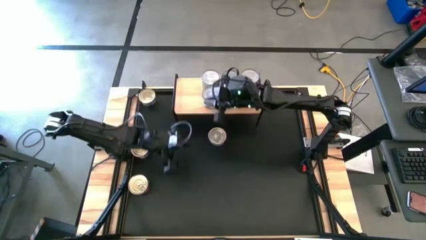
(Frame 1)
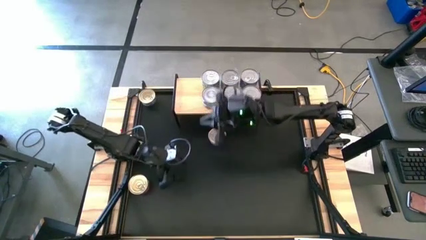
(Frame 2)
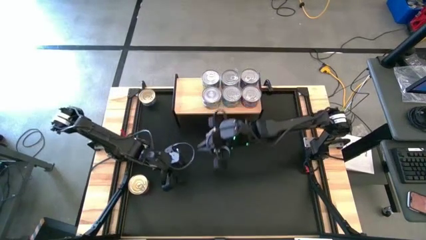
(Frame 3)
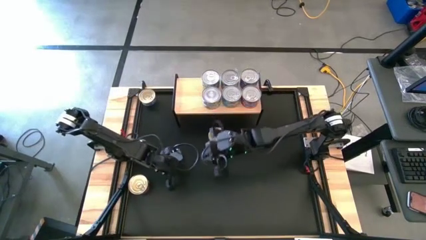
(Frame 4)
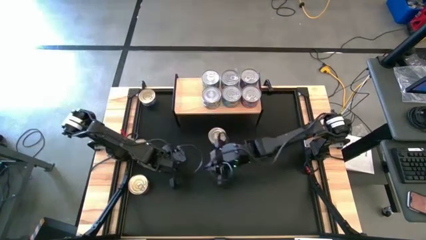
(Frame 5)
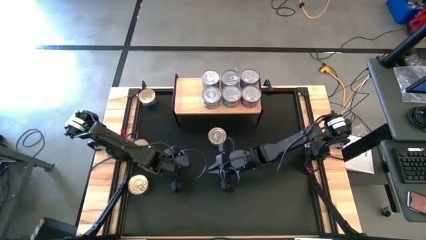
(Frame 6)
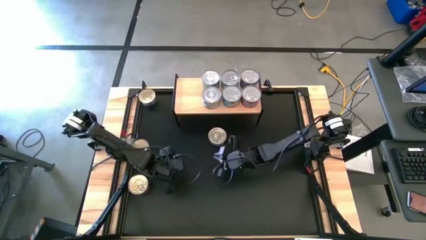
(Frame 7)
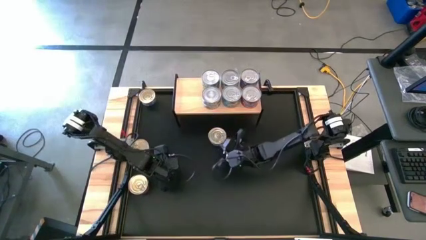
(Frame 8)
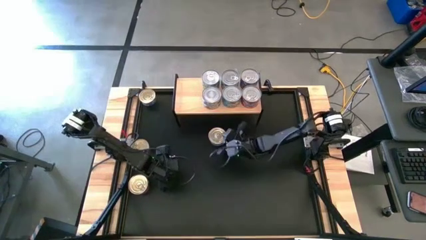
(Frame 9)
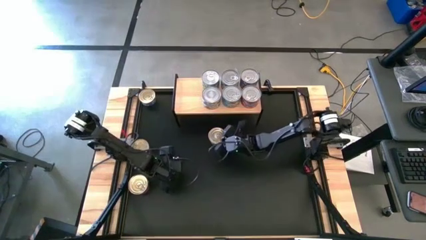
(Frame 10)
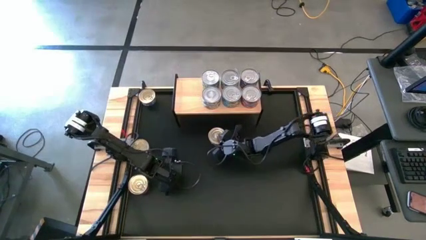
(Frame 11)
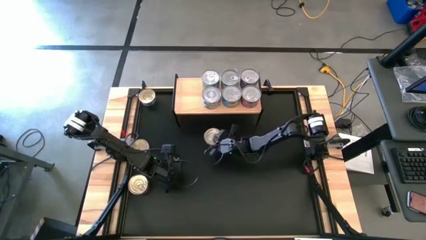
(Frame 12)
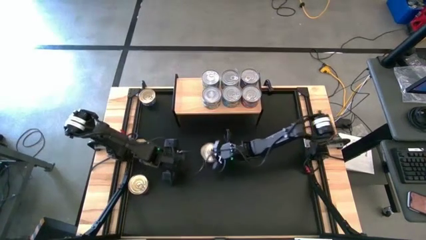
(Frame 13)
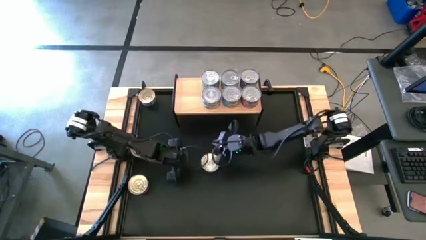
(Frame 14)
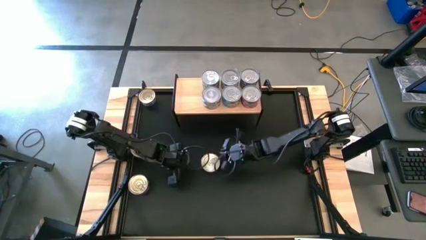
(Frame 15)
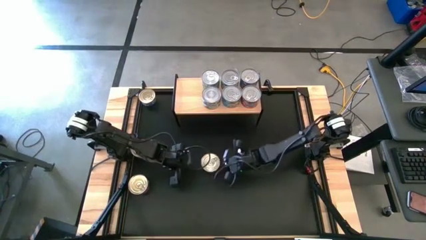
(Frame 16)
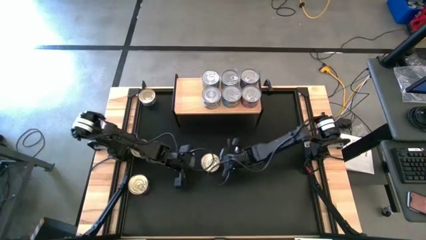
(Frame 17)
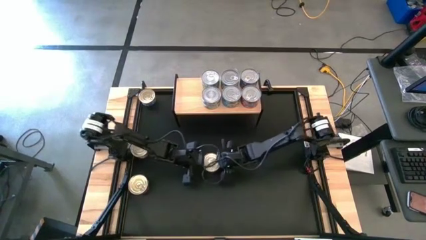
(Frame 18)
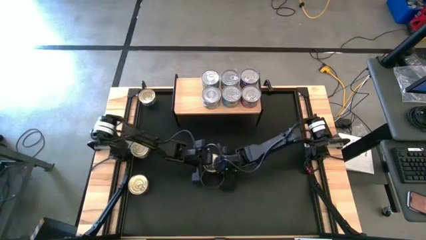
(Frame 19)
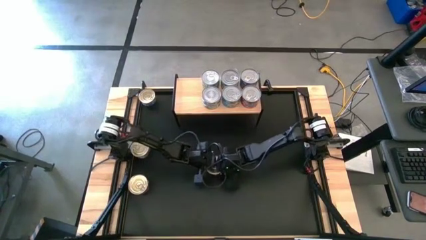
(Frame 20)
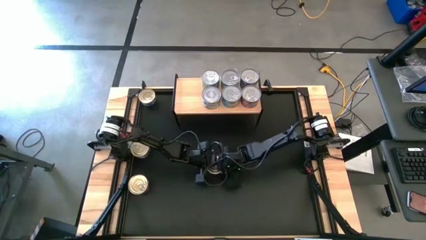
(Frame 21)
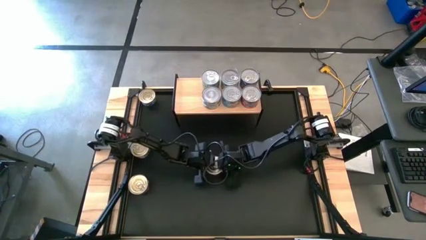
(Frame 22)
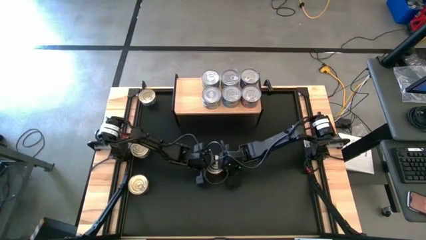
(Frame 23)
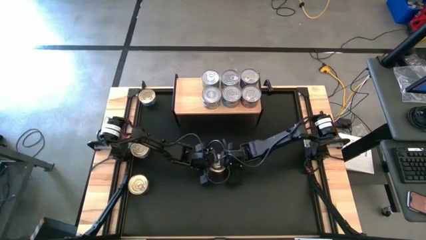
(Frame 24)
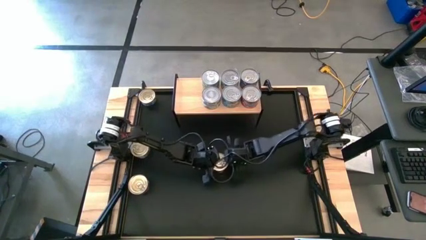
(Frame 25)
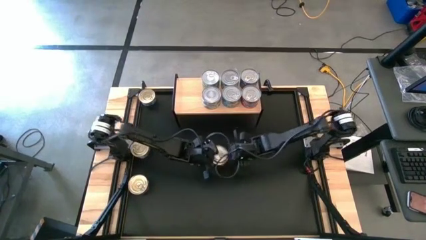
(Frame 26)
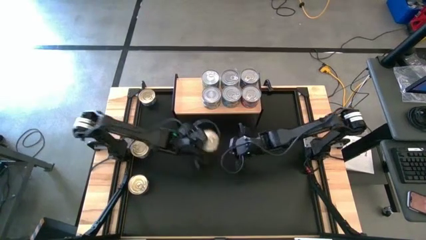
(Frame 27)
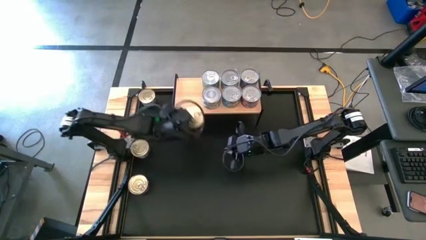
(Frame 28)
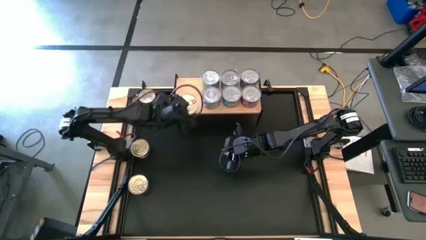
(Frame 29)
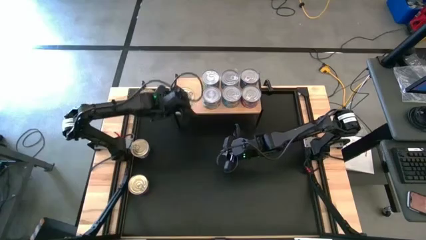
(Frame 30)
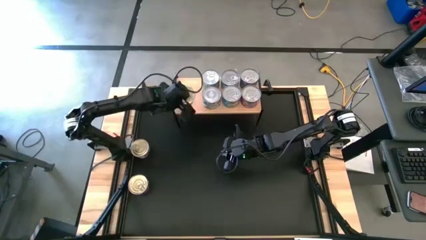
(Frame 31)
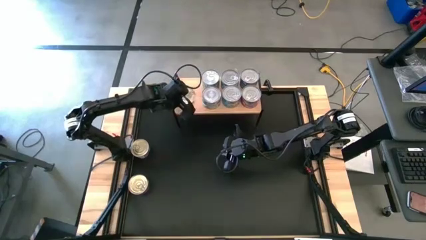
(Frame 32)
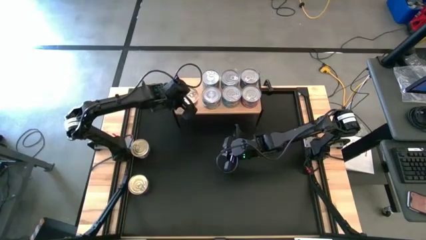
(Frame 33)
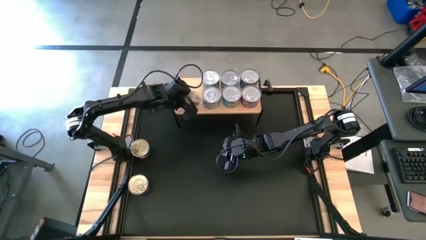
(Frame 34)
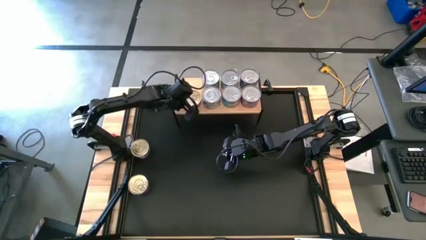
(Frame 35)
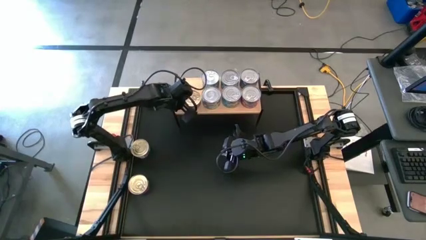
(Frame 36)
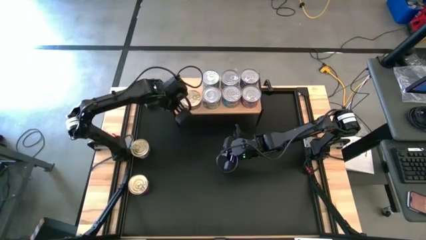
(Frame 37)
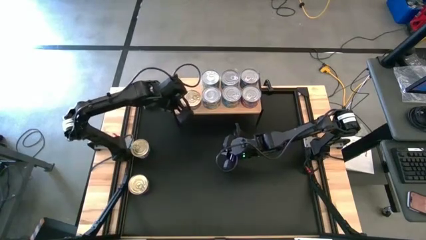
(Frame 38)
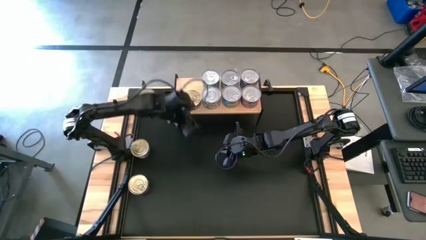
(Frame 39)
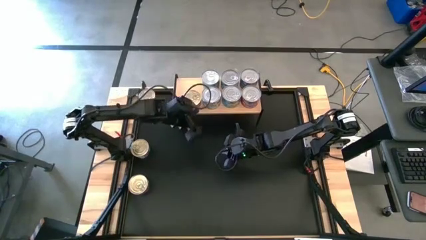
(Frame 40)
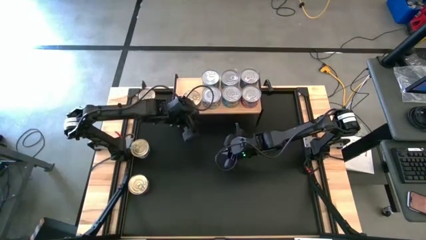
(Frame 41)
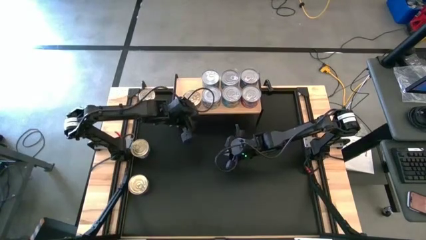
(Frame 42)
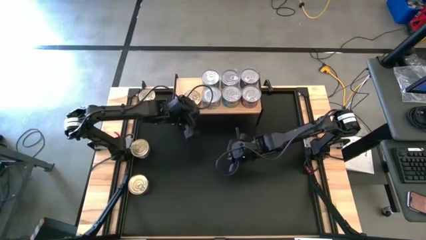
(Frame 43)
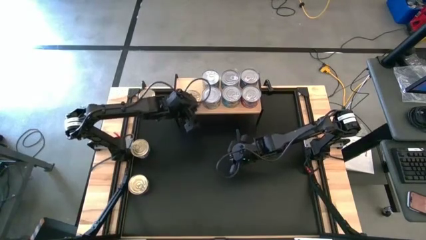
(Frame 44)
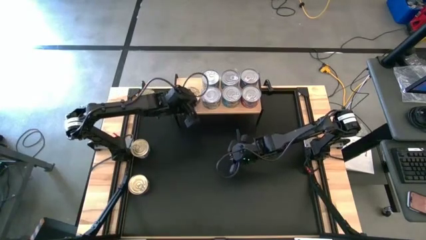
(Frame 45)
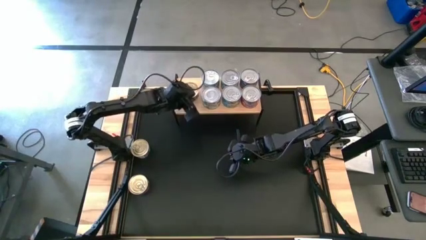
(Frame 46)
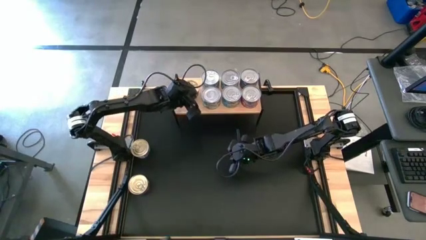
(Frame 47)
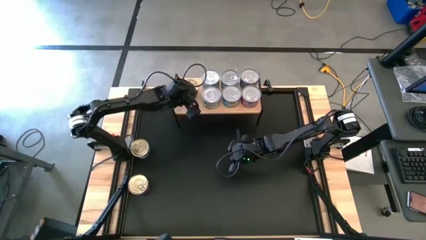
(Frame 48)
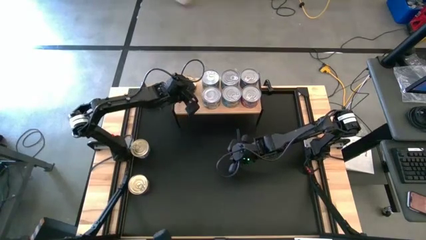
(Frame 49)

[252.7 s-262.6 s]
Task: Stack canned seafood by type on shelf
Put the blue pink tuna can on the shelf

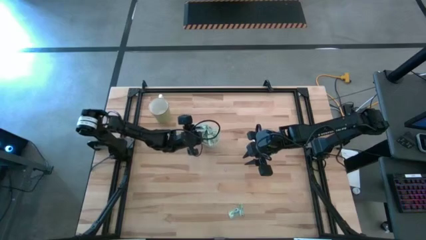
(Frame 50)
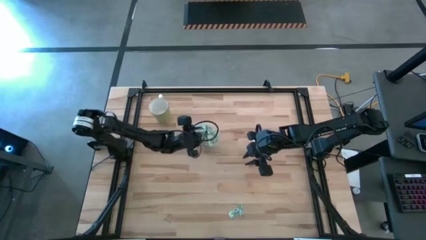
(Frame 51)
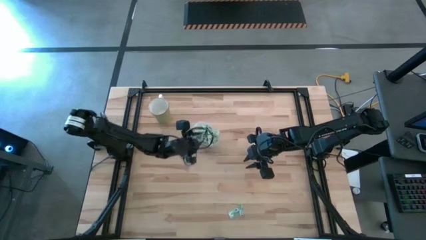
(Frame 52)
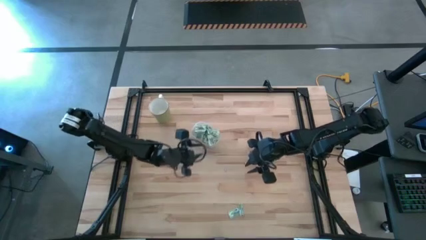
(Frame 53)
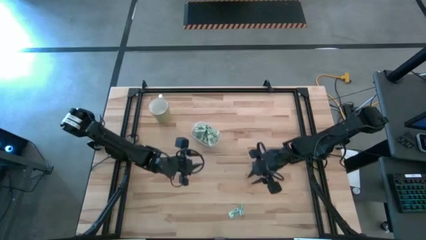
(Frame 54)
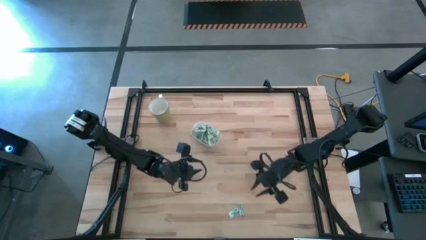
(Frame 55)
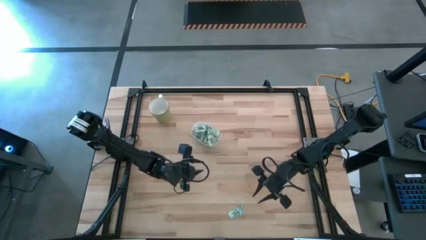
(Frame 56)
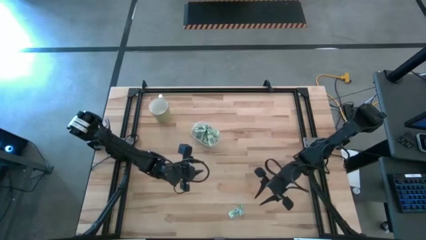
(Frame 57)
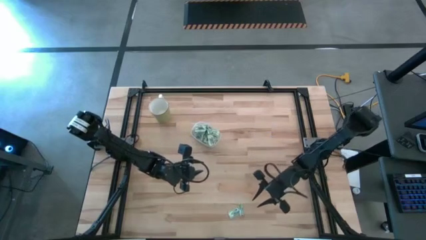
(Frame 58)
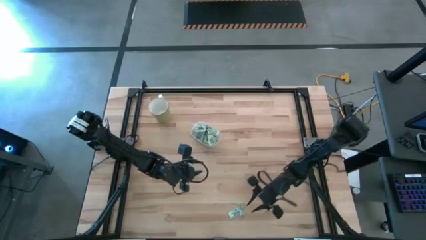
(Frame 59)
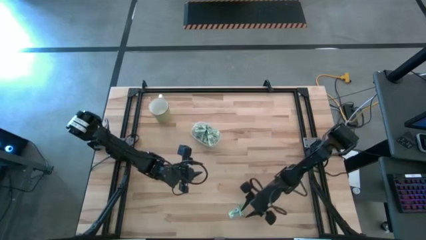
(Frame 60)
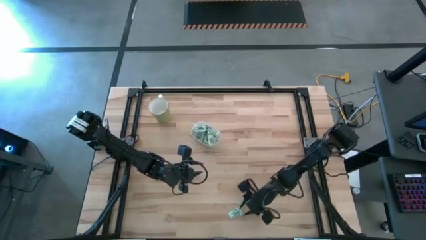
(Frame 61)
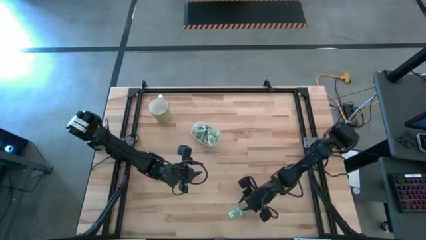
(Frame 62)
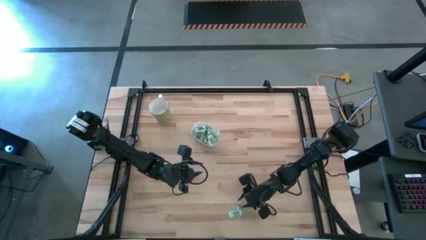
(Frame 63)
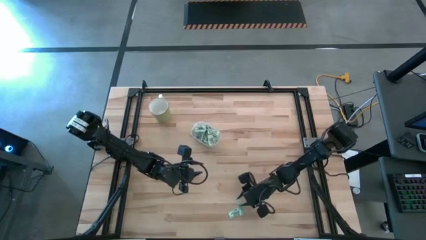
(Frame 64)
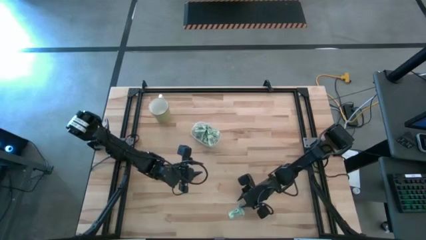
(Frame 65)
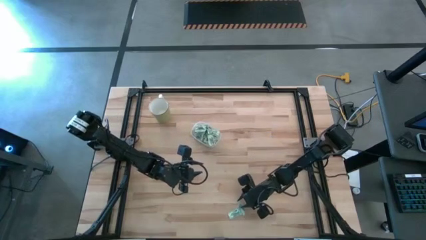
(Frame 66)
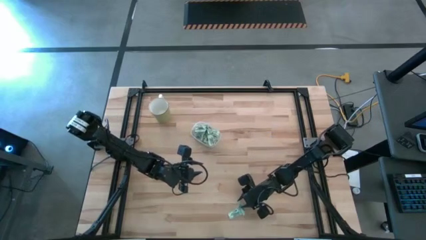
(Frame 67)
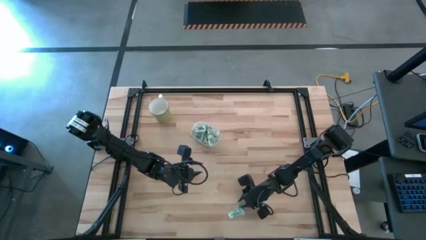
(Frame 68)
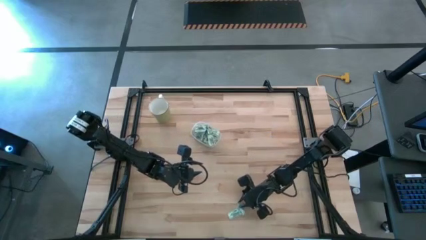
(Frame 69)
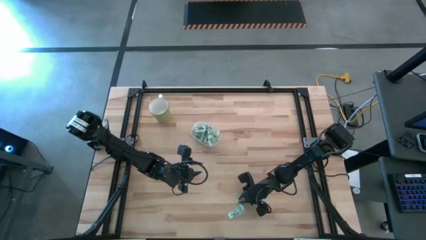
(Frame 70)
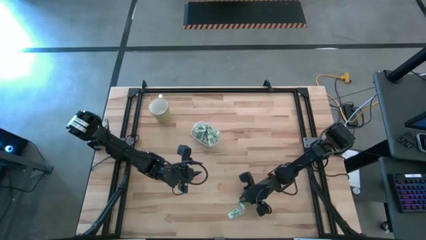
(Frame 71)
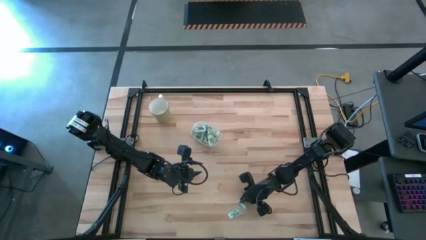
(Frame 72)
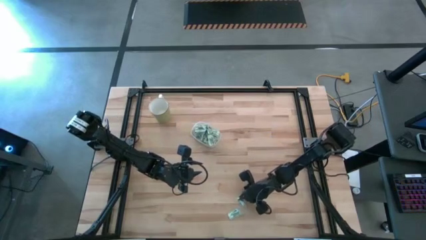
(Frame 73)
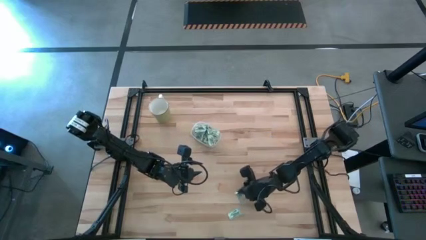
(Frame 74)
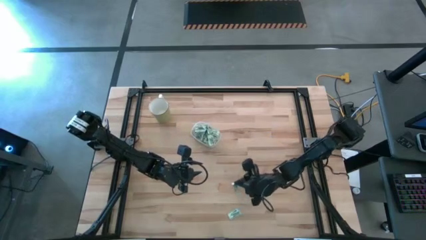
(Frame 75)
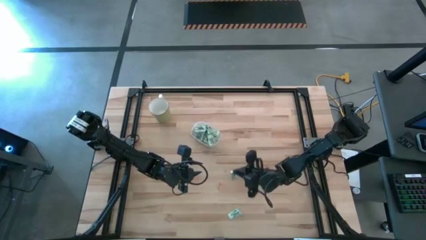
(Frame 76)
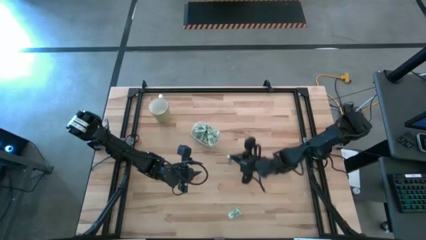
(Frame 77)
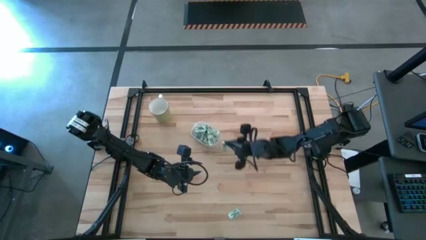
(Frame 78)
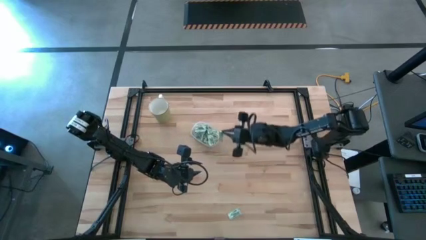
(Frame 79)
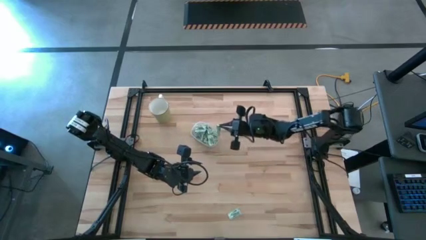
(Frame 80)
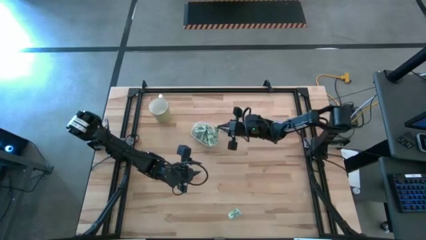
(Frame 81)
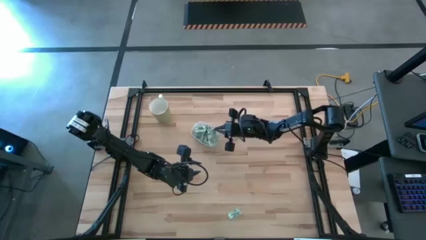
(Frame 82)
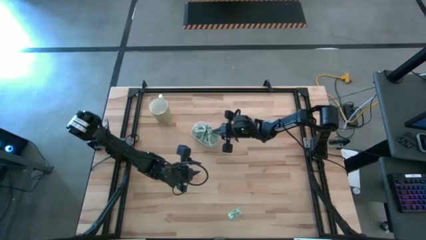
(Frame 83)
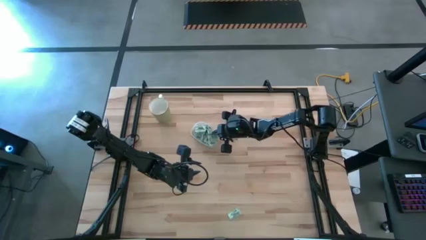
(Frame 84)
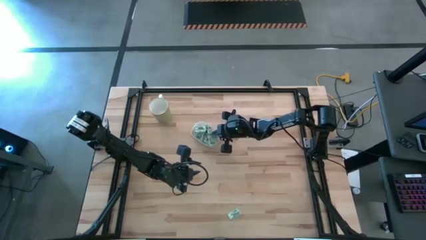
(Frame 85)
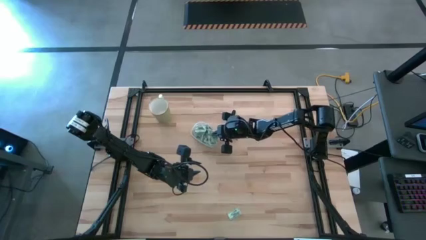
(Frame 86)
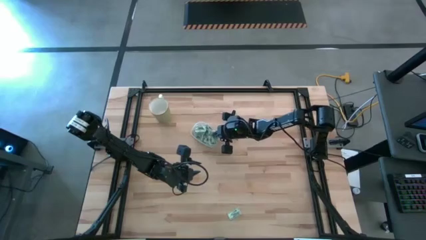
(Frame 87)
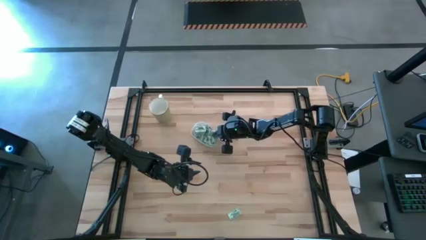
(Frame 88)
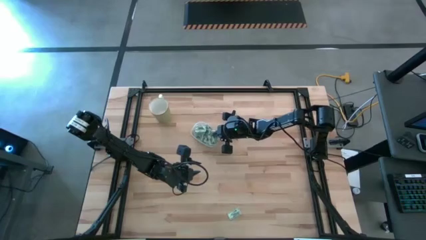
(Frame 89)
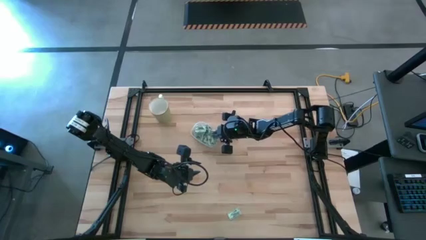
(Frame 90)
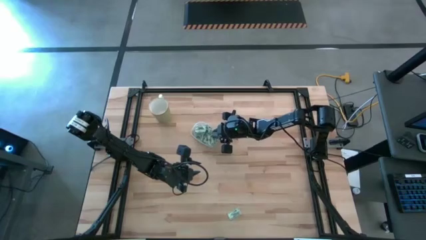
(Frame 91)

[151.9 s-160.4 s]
Task: Pick and place Stevia / Truvia into bins
Put the right stevia packet into the transparent container
